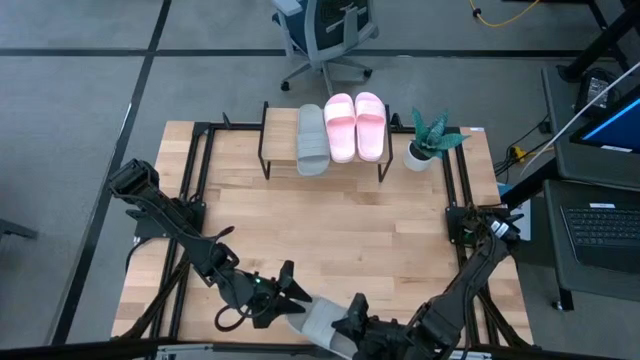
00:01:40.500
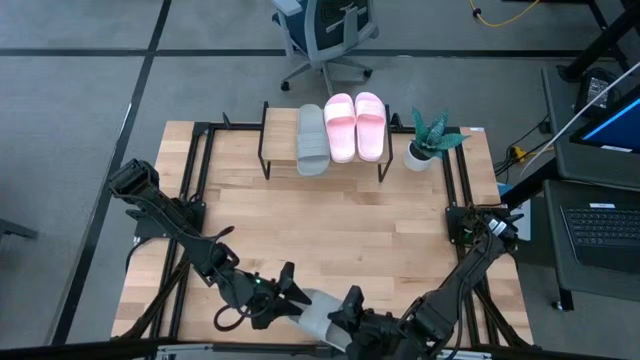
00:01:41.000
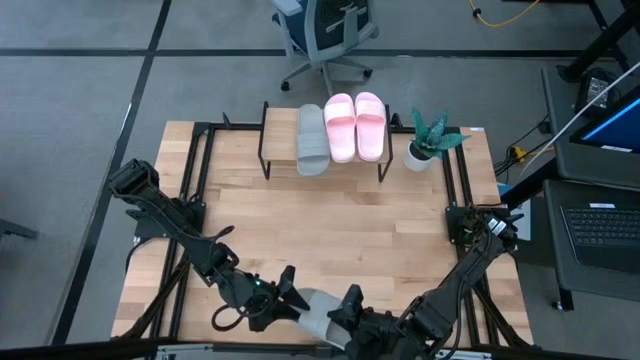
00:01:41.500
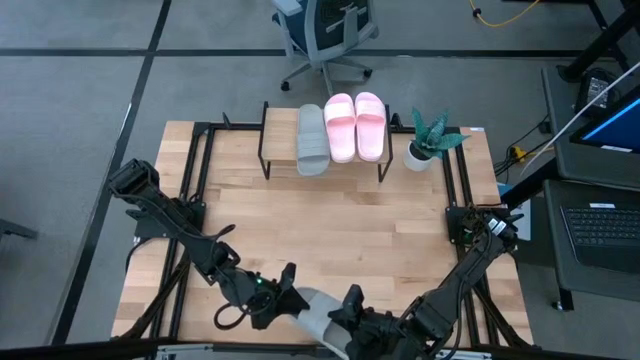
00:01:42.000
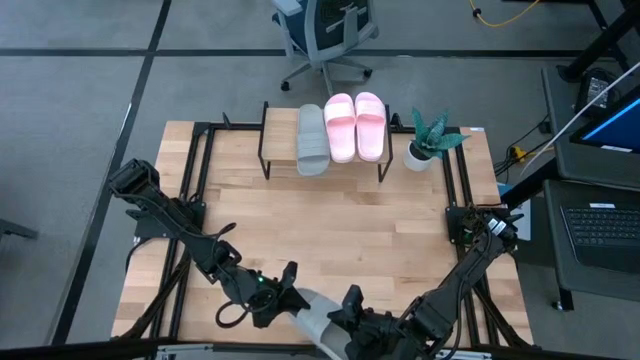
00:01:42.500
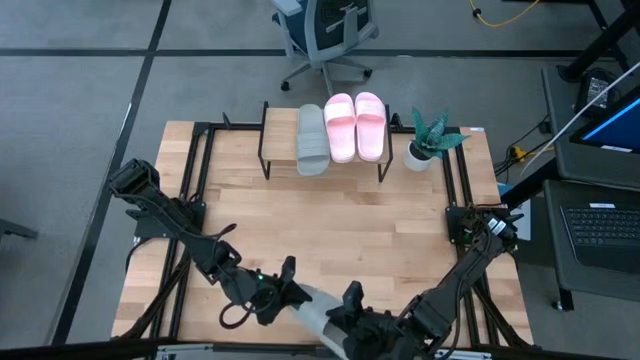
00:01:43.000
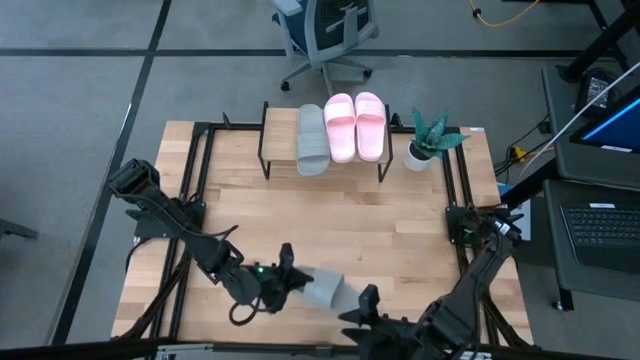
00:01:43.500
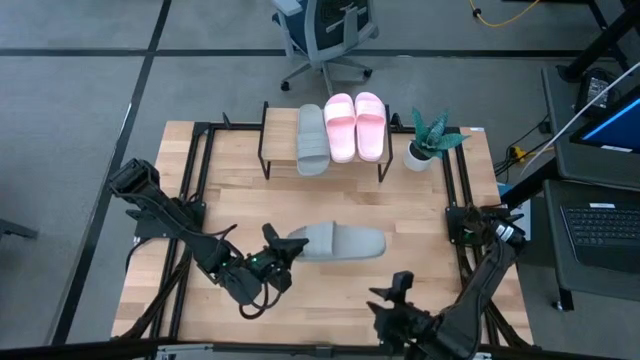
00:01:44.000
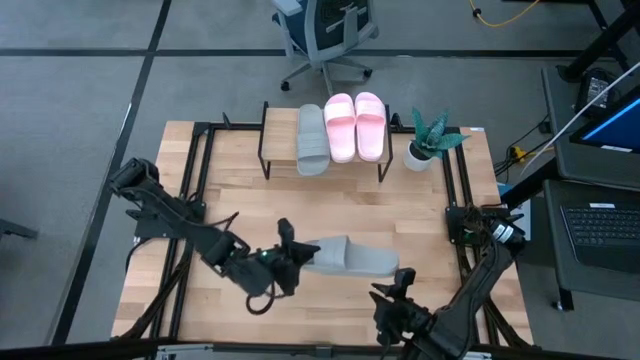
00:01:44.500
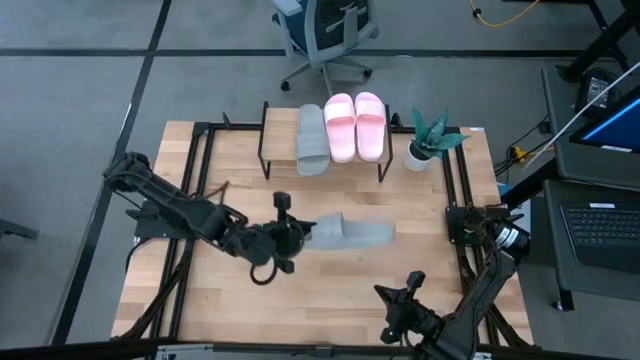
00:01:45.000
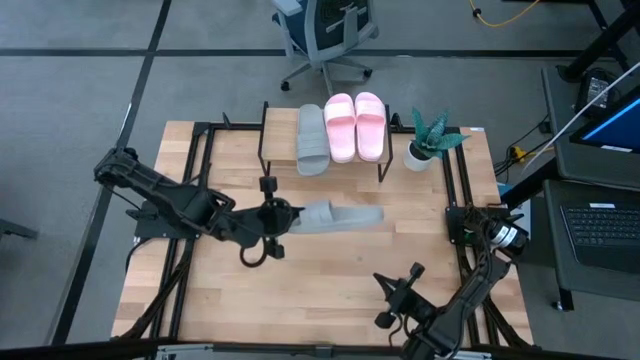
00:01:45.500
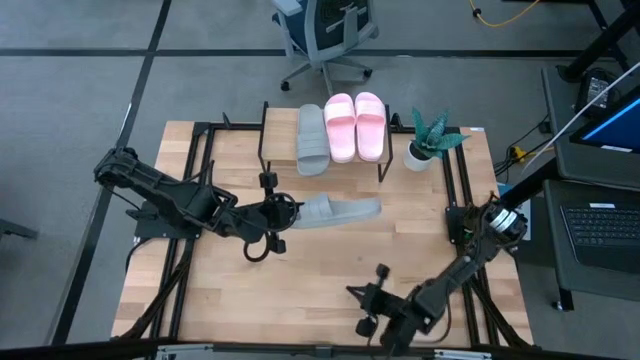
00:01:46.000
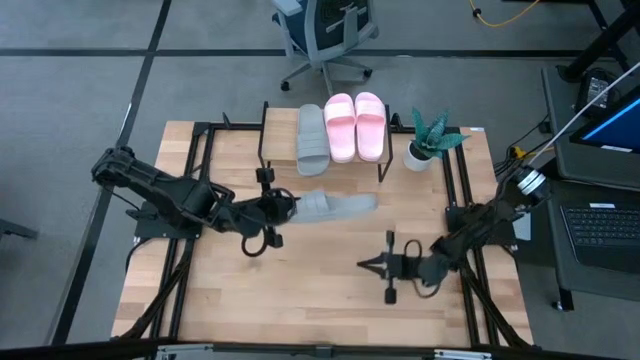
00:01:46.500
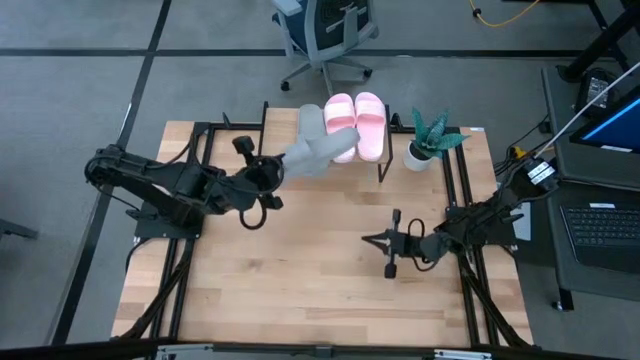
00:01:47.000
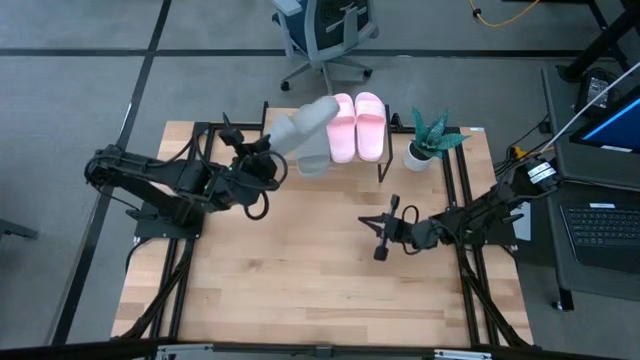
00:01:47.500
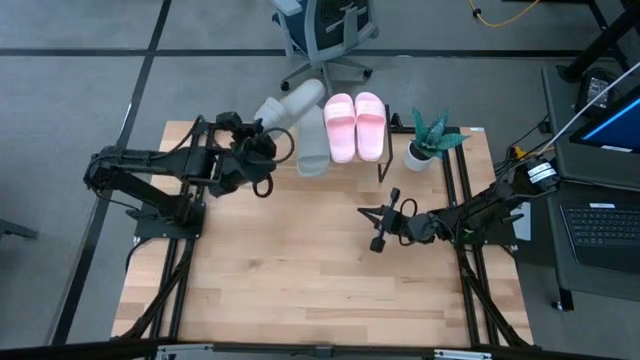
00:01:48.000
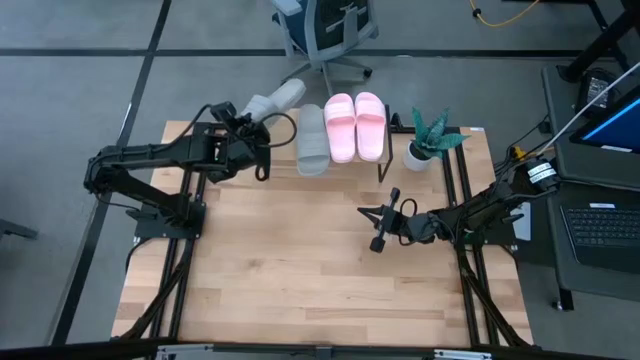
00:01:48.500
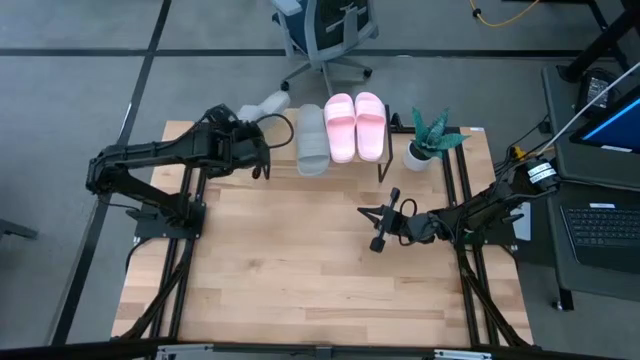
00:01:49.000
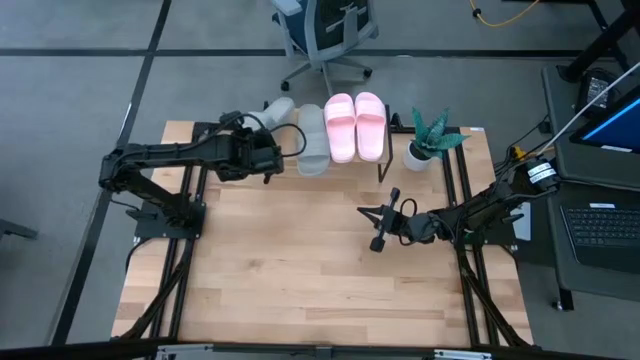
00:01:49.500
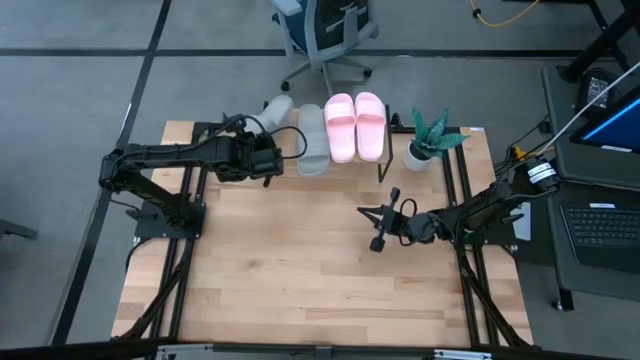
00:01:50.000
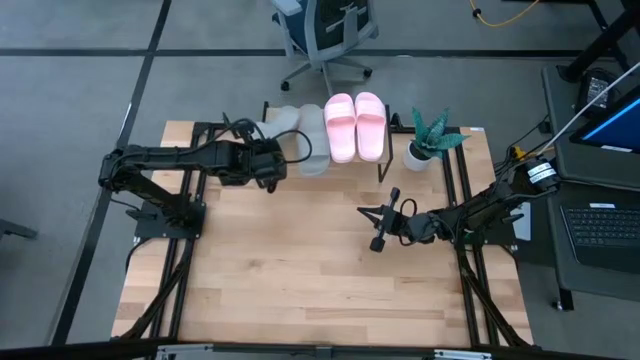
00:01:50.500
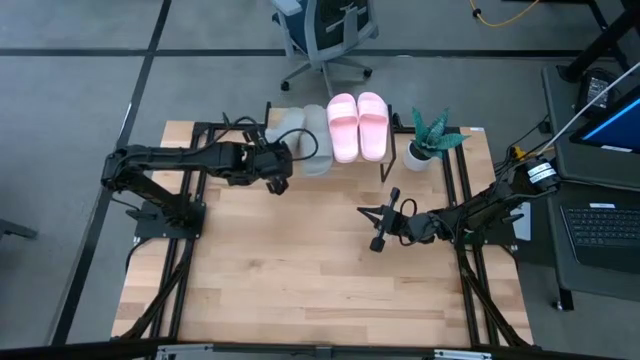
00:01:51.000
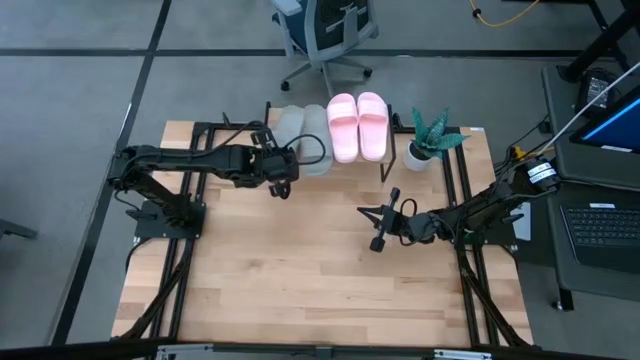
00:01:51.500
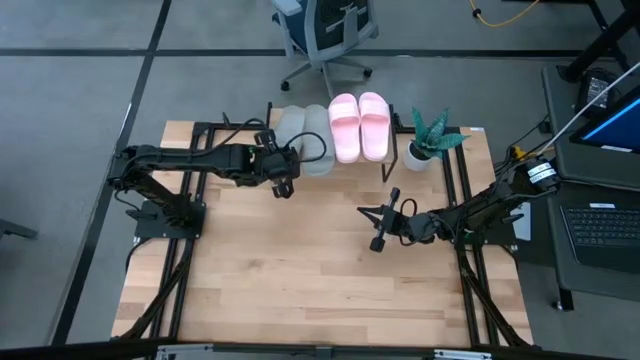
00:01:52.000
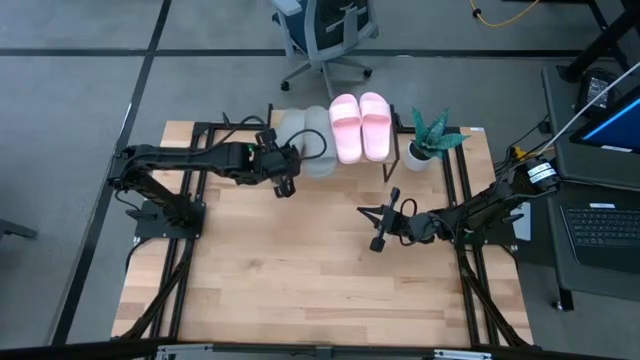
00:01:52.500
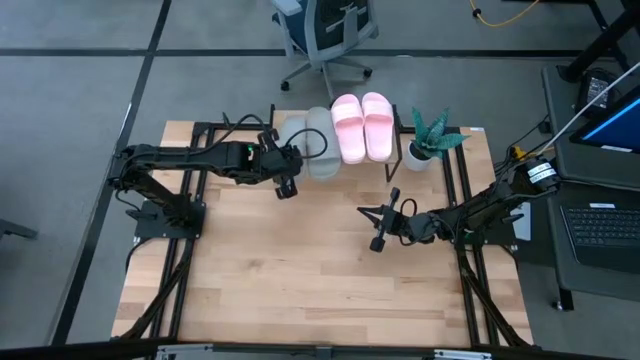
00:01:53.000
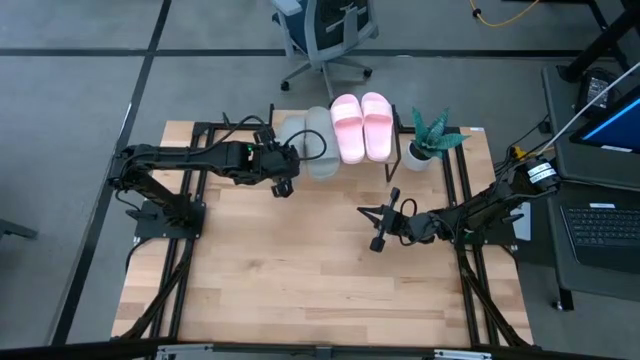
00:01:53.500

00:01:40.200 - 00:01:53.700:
Task: Pick and place slides into the shelf
Put the gray slipper on the shelf

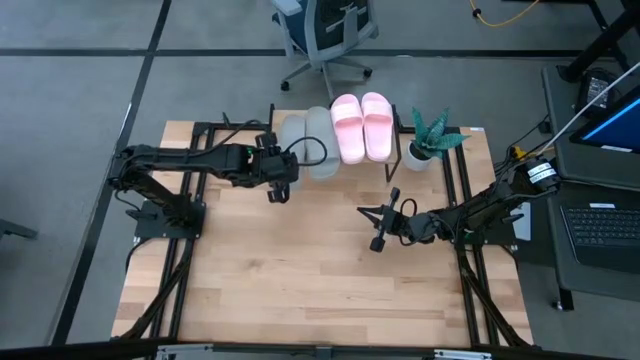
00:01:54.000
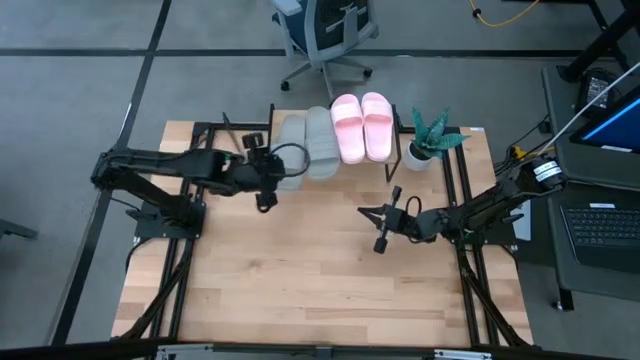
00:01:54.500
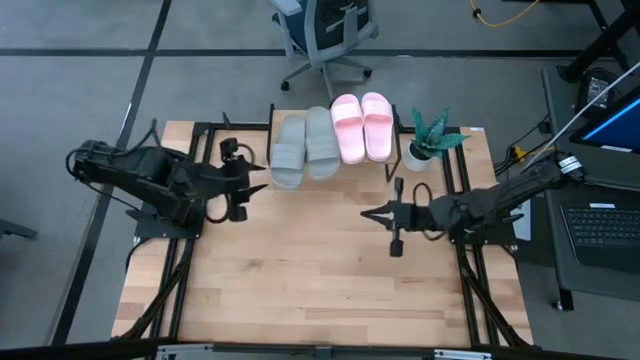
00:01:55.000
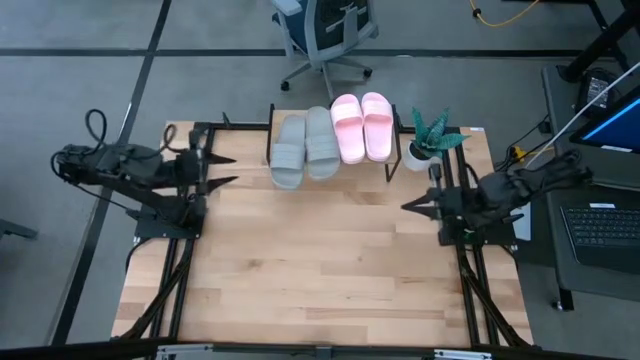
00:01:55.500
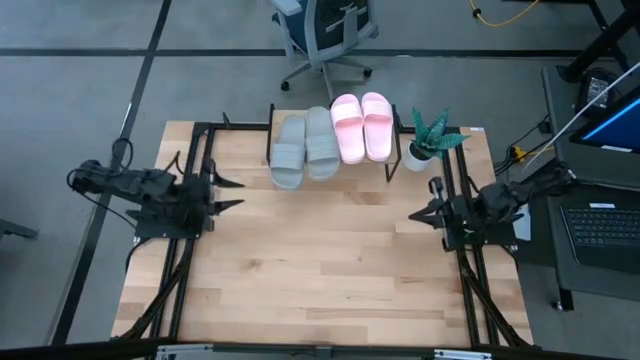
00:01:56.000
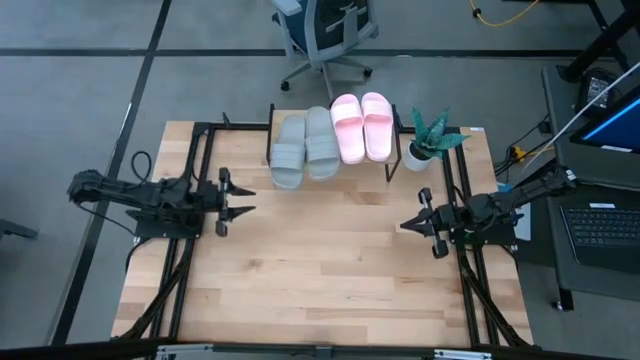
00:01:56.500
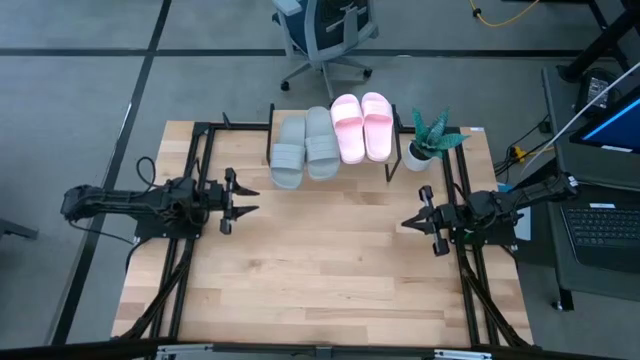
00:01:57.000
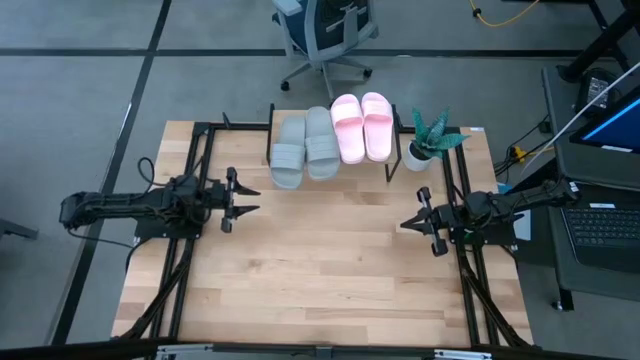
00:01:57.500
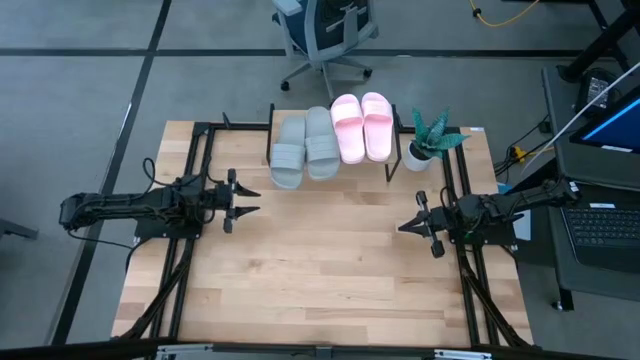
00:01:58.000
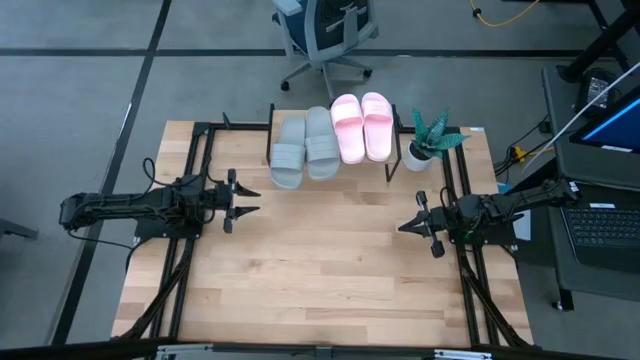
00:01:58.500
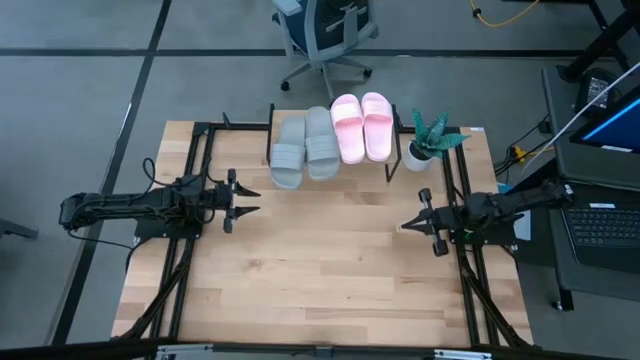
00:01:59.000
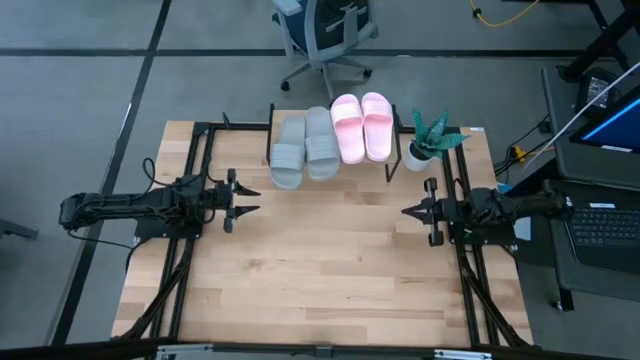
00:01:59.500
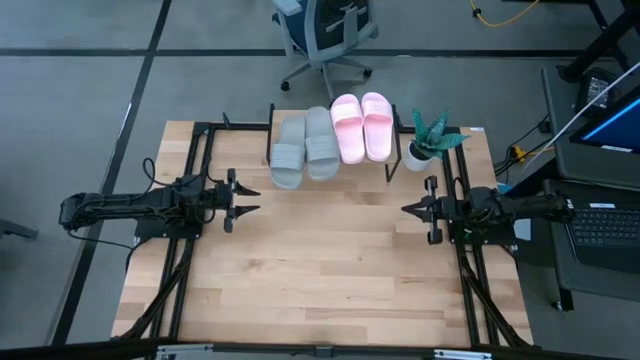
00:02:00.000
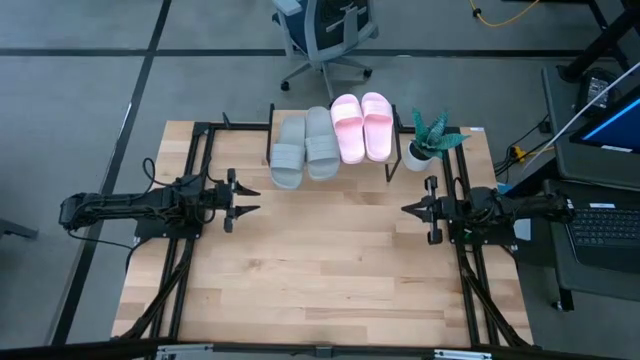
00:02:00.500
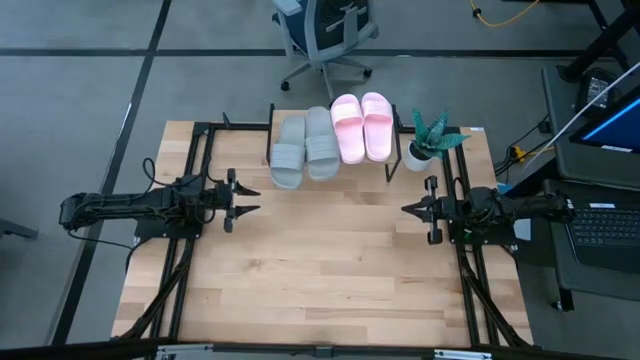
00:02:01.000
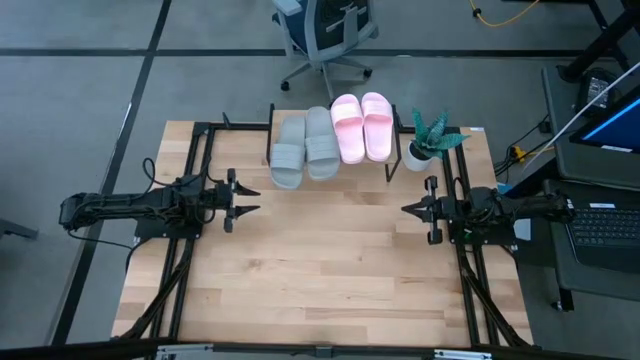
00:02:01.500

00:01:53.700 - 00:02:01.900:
Return to Home Position

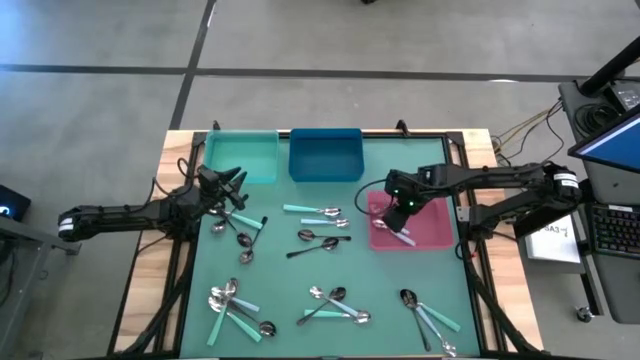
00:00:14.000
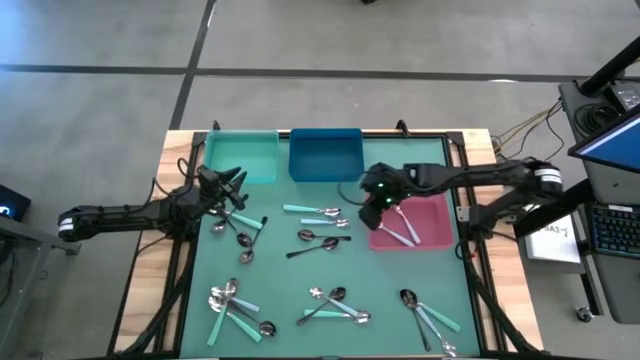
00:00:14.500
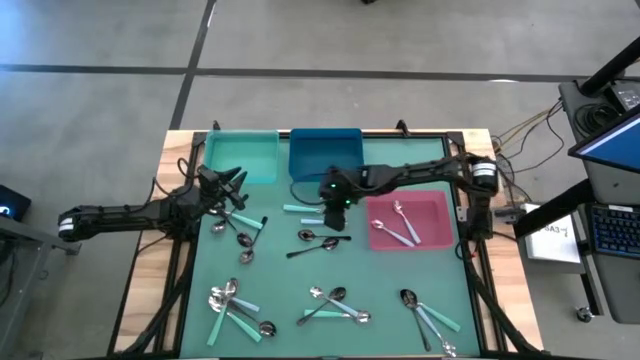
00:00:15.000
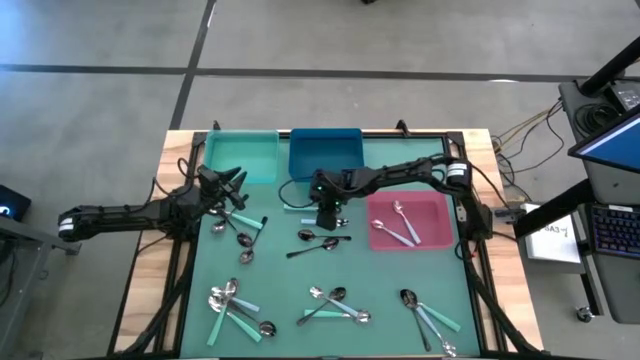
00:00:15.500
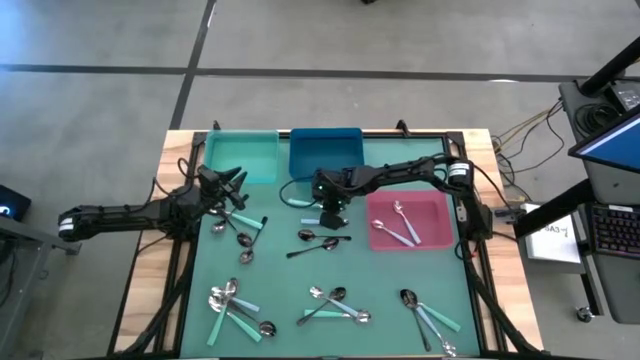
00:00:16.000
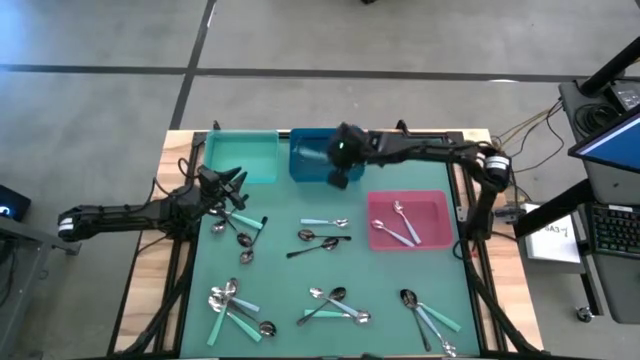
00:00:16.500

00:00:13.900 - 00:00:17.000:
Task: Sort silverware by color (type)
Put the green spoon into the blue bin
